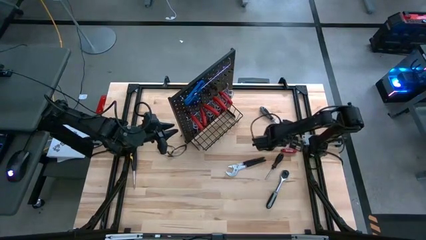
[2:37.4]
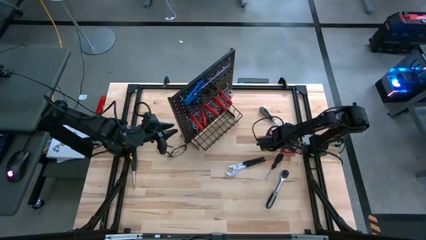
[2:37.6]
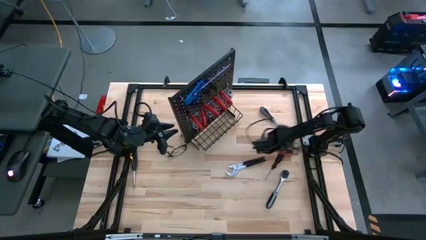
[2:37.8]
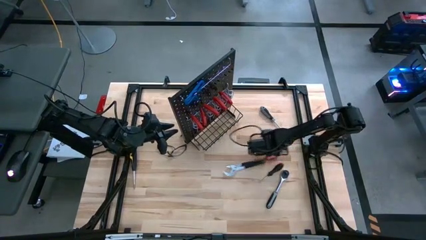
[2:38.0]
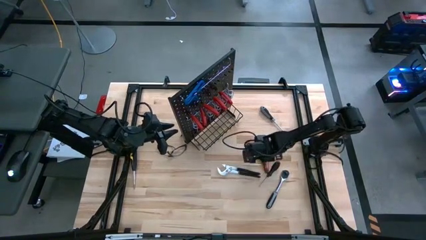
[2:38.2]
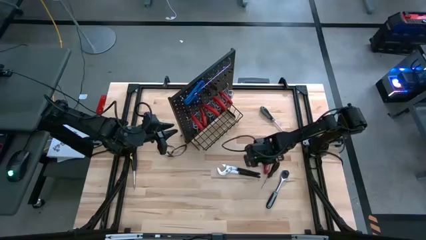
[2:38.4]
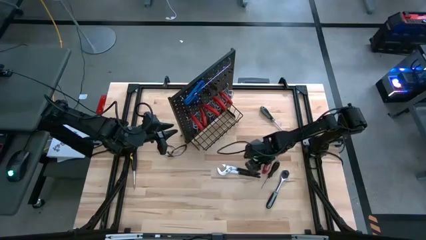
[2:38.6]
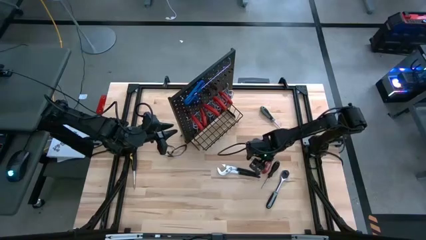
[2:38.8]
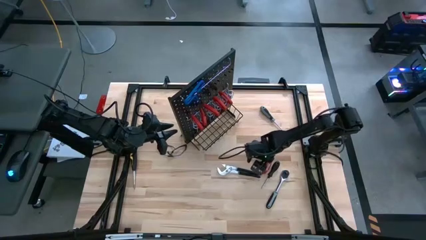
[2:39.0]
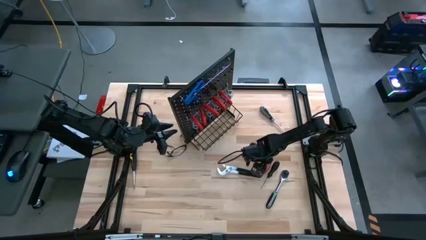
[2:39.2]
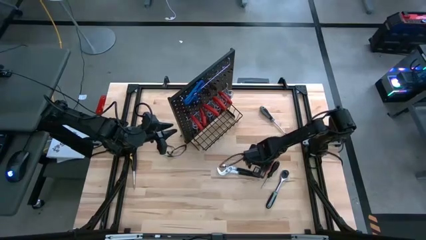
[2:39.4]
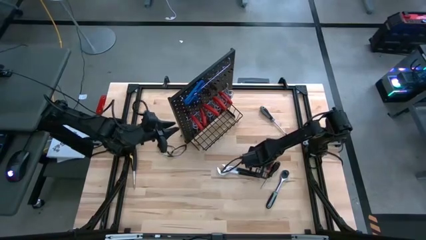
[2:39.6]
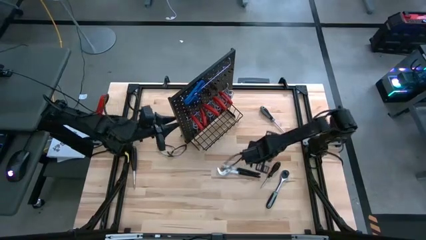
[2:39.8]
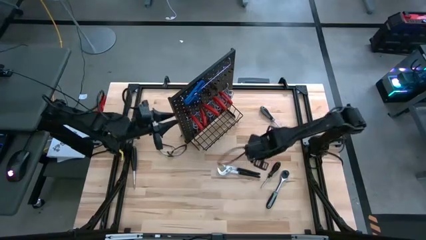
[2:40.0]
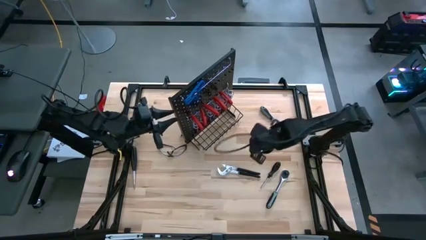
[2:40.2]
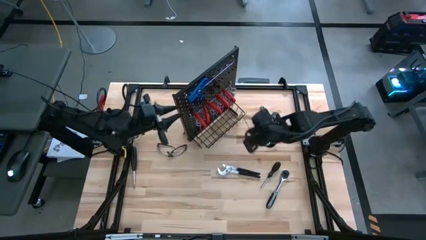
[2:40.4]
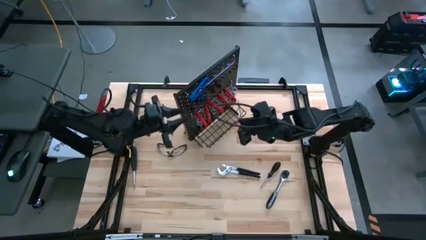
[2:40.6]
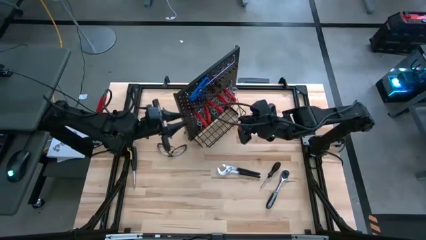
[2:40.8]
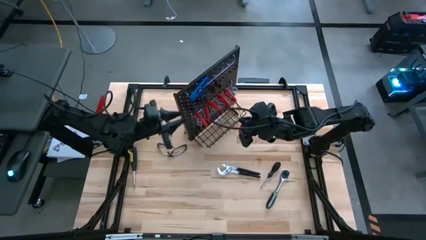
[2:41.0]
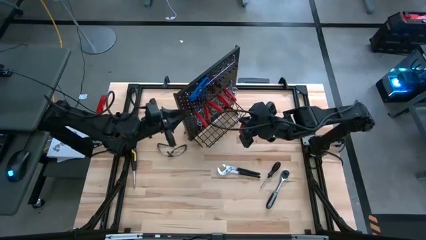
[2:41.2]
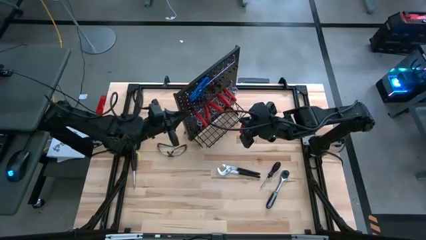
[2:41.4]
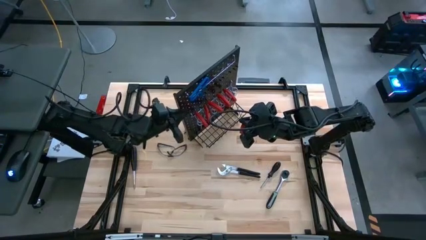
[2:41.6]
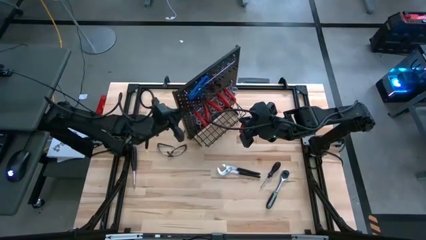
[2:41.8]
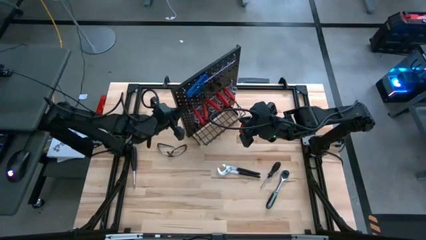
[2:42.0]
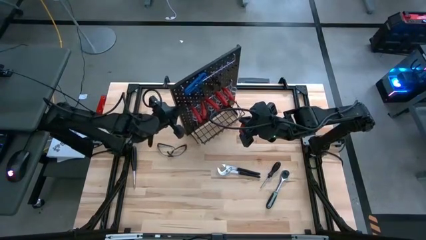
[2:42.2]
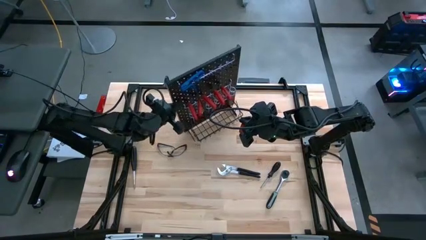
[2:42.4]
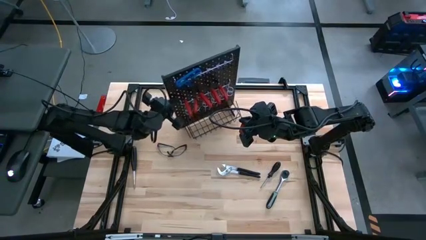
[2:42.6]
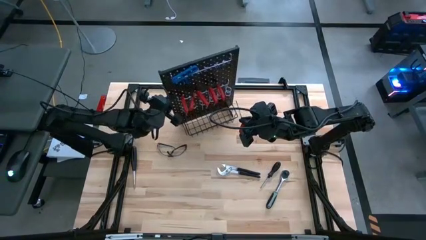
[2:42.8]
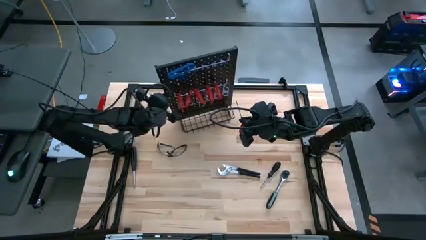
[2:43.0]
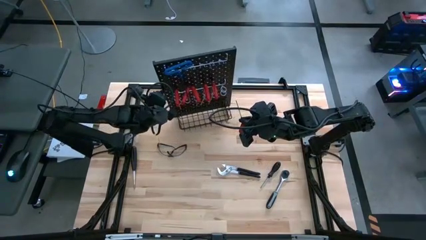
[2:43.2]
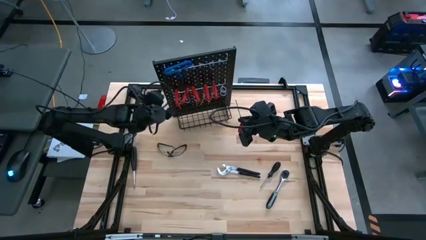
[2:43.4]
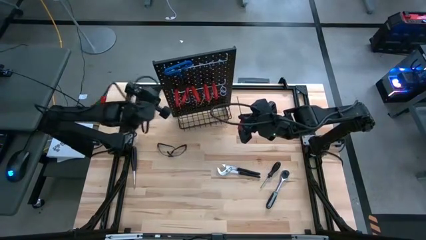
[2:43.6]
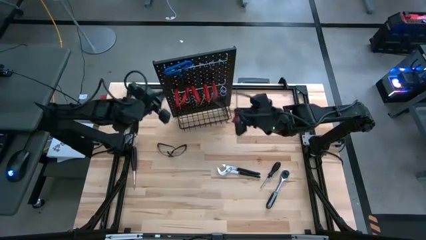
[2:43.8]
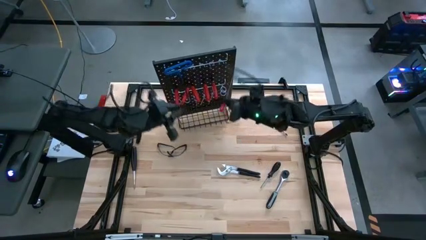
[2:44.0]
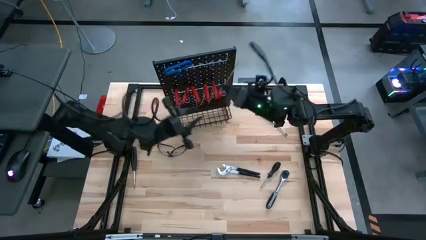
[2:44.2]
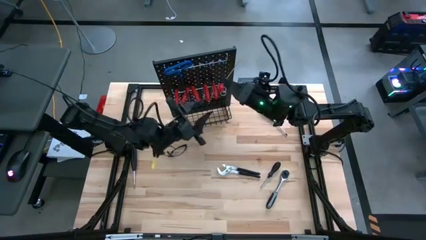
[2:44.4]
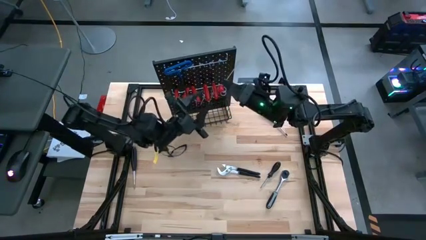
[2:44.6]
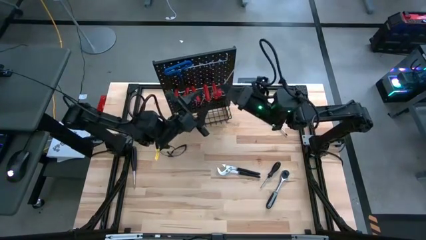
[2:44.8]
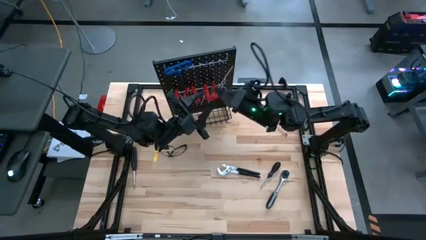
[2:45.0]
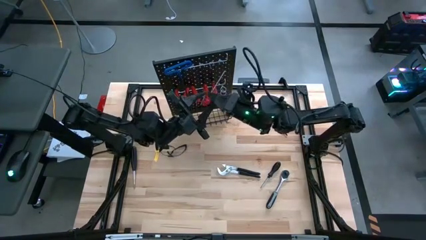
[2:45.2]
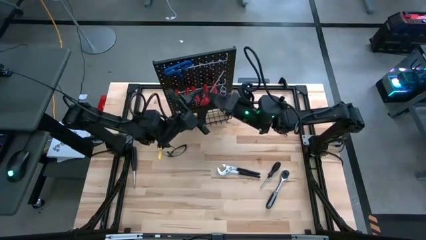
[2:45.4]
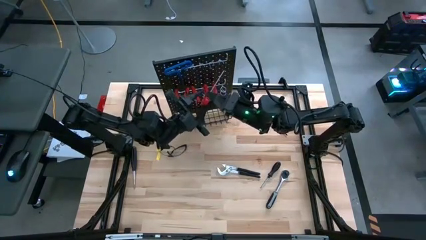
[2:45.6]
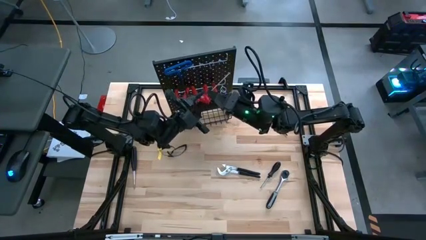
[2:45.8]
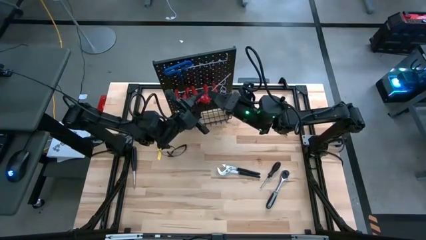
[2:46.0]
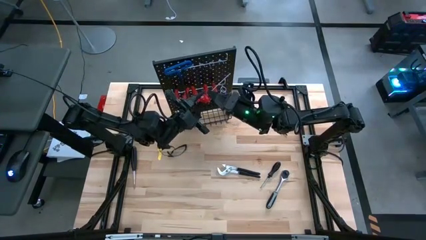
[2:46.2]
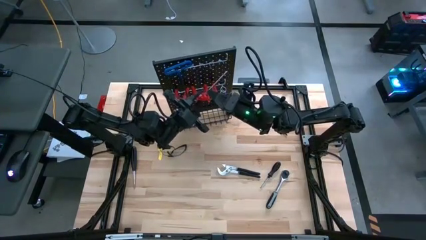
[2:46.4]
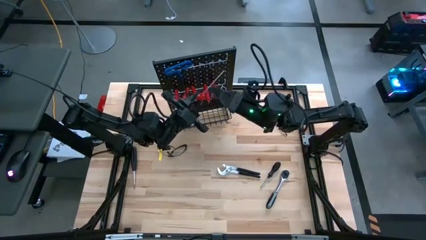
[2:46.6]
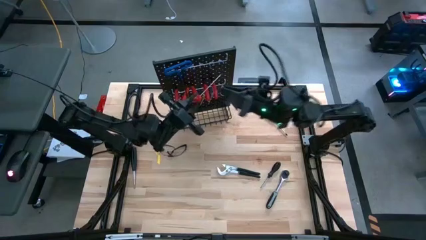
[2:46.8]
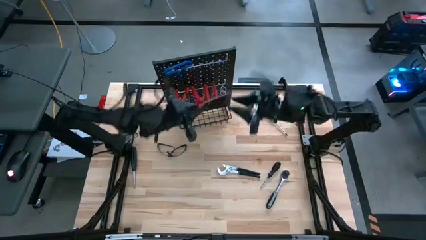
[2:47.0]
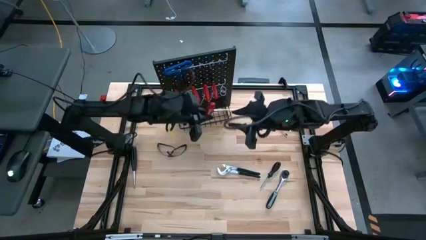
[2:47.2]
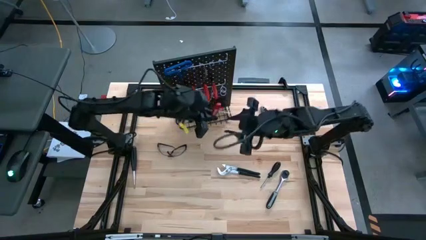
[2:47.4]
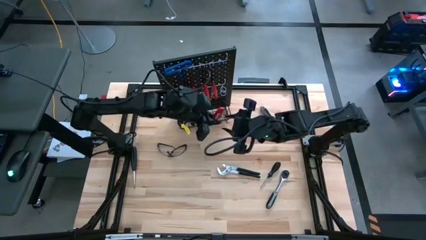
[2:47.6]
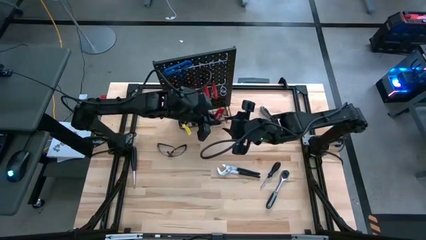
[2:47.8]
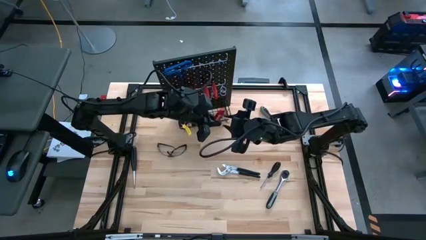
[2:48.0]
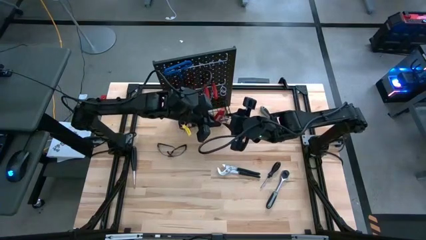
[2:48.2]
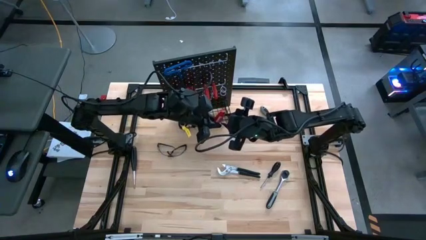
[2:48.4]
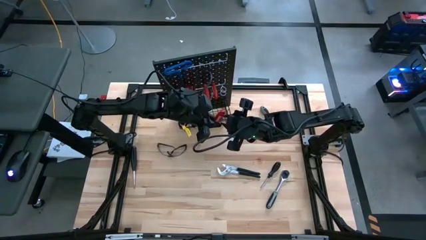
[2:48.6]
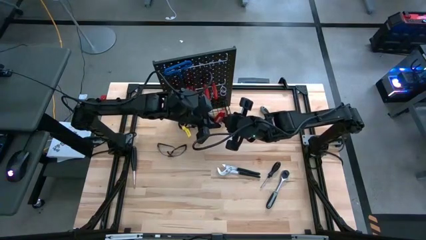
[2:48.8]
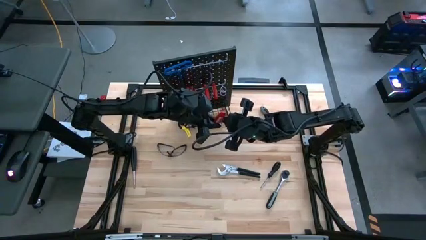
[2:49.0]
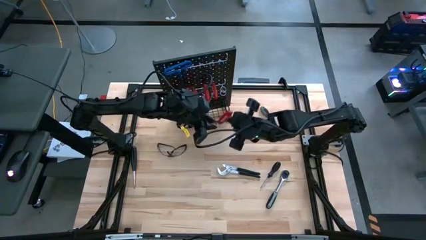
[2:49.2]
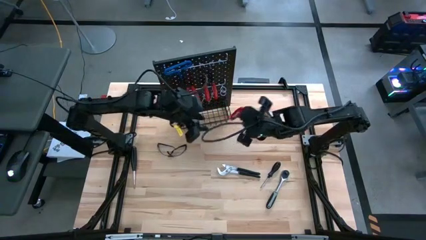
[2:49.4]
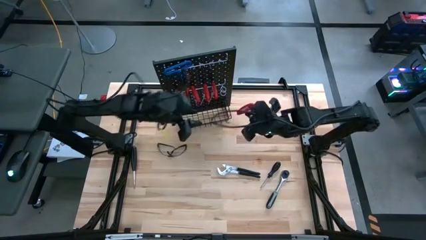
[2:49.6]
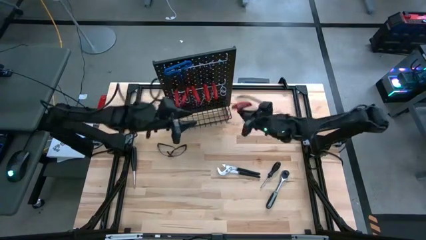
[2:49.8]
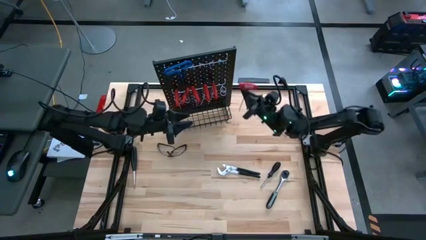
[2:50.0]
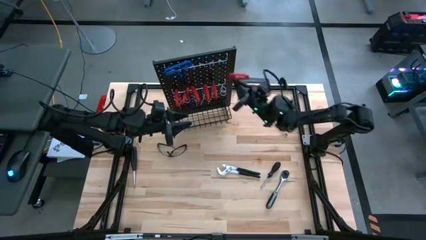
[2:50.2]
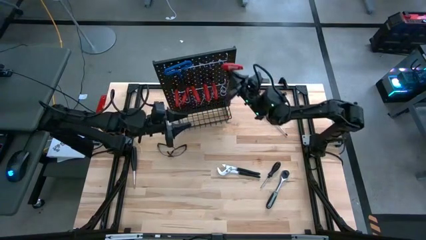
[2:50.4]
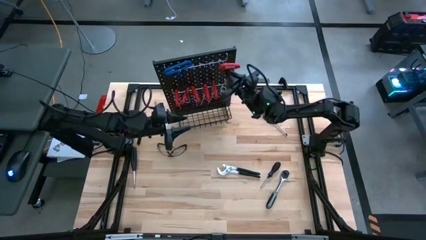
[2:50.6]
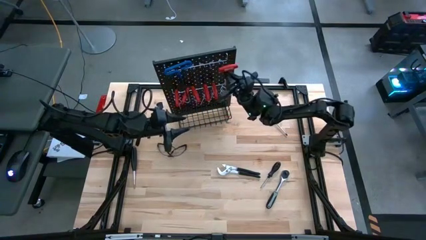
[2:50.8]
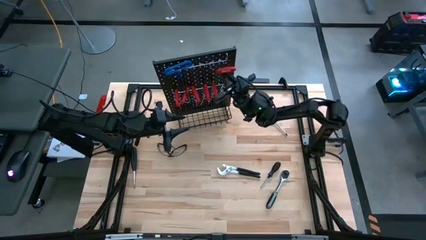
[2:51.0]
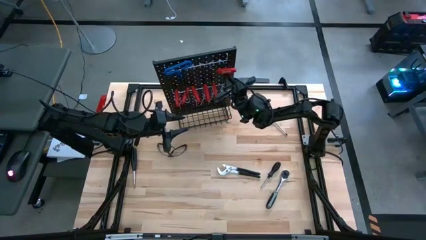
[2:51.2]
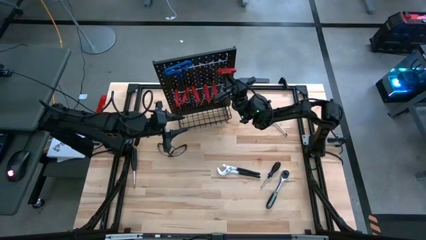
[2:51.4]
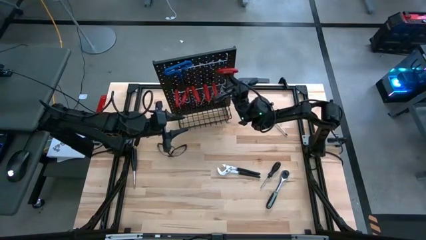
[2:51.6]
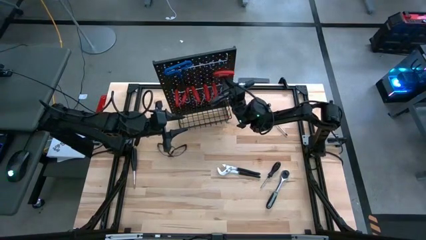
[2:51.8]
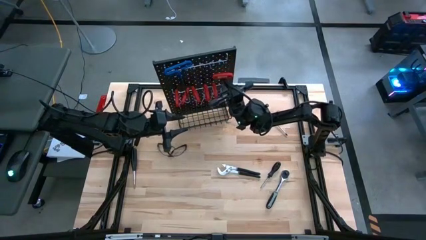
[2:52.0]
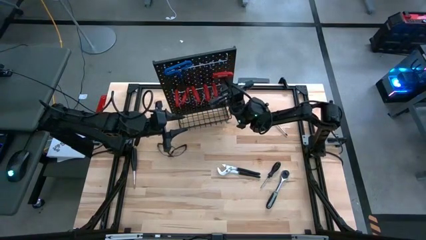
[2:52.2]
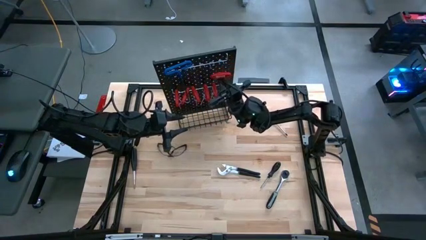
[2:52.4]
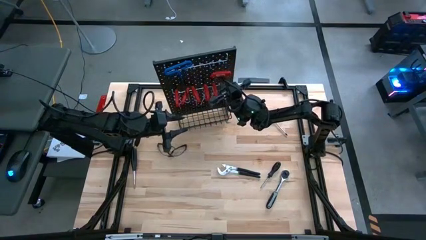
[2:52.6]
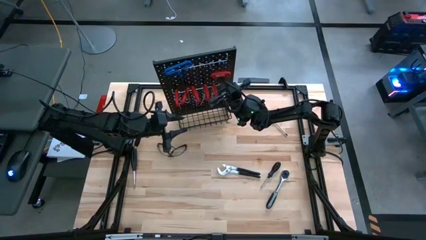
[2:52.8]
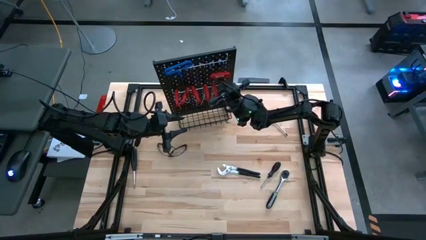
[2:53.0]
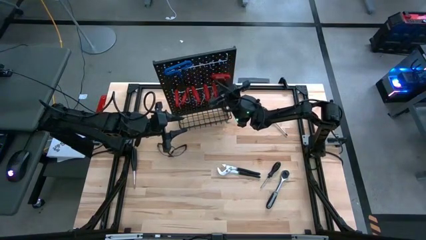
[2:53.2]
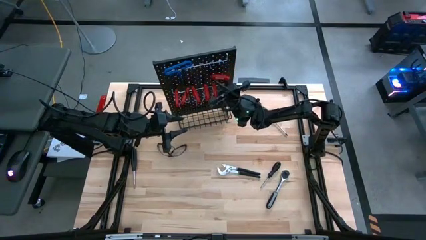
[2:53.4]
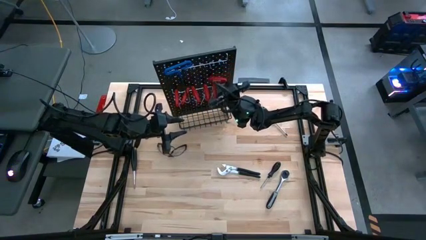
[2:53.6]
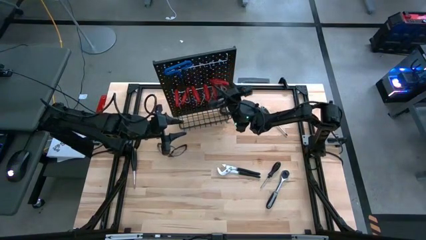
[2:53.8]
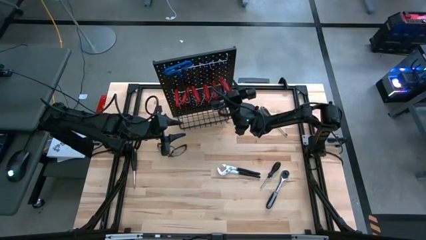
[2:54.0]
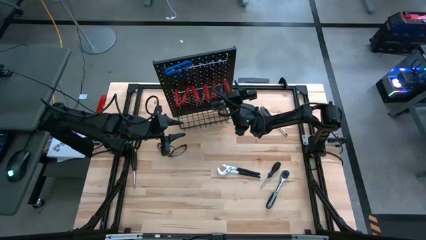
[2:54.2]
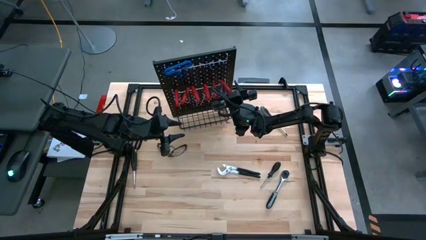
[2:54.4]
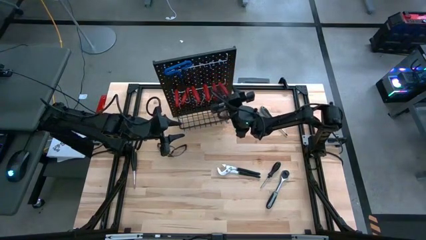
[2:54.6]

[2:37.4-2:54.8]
Task: Hang tools onto peg board
Hang the red allen wrench on the peg board
